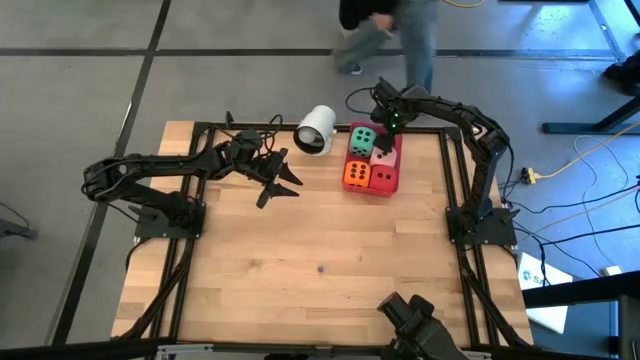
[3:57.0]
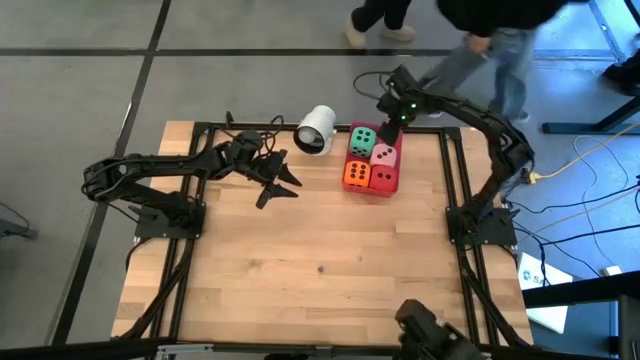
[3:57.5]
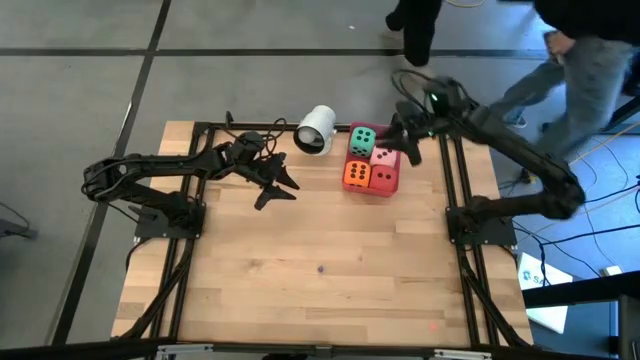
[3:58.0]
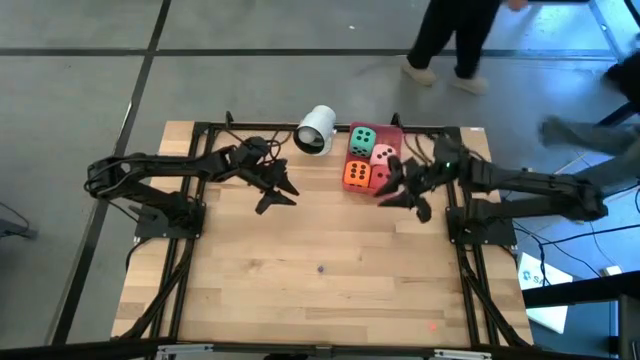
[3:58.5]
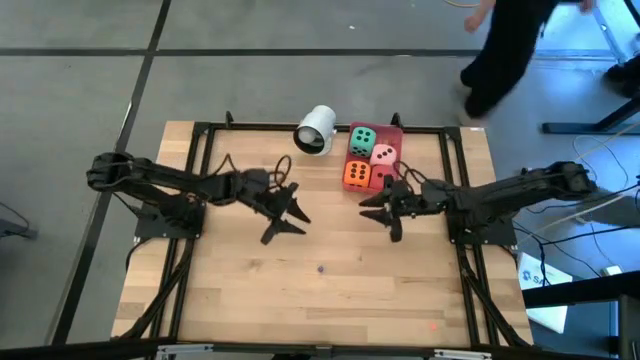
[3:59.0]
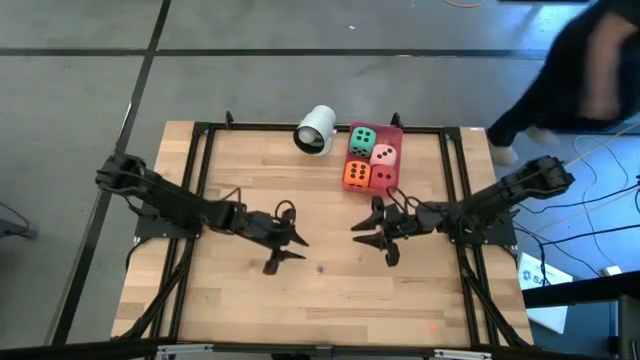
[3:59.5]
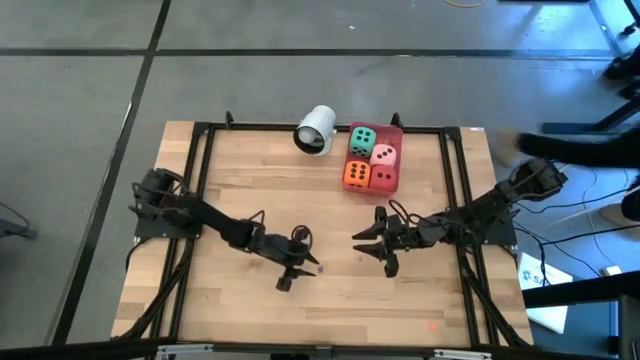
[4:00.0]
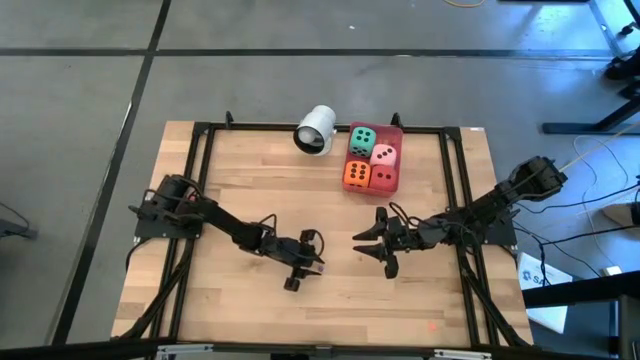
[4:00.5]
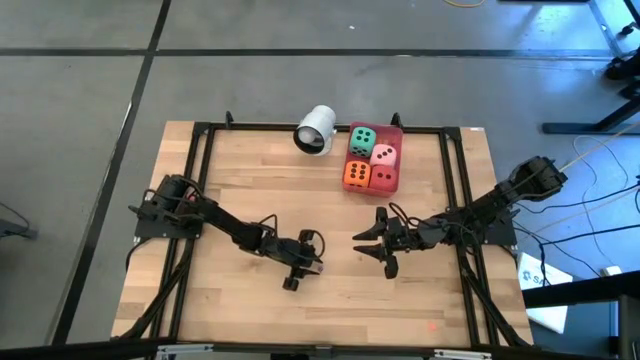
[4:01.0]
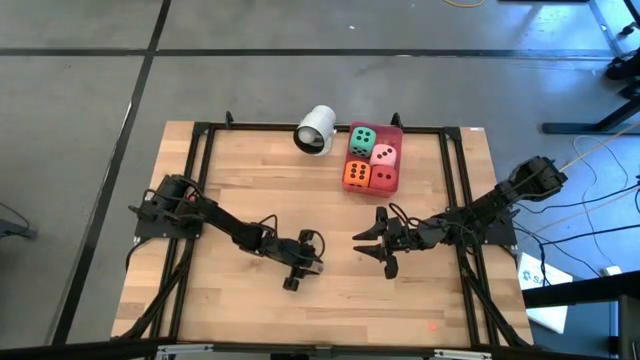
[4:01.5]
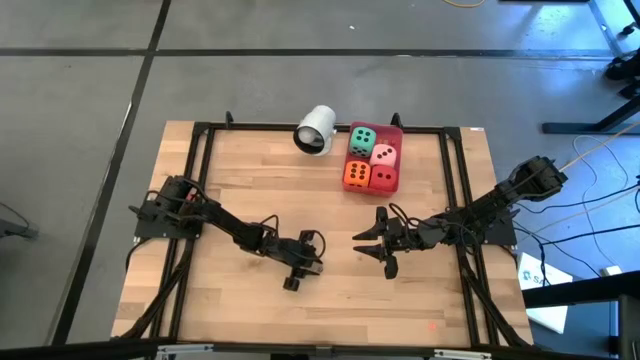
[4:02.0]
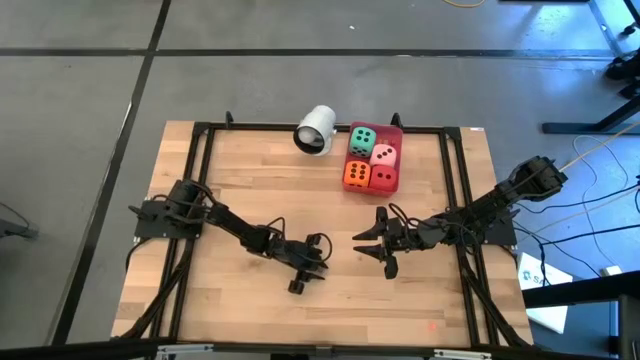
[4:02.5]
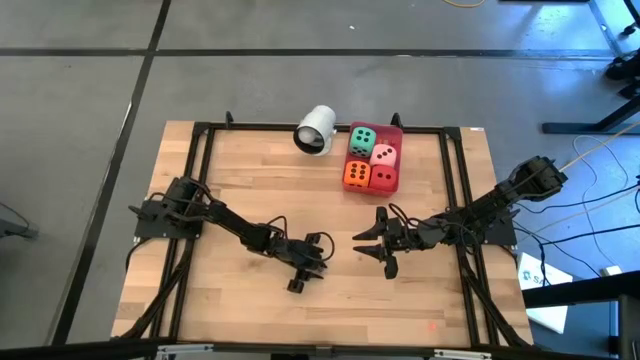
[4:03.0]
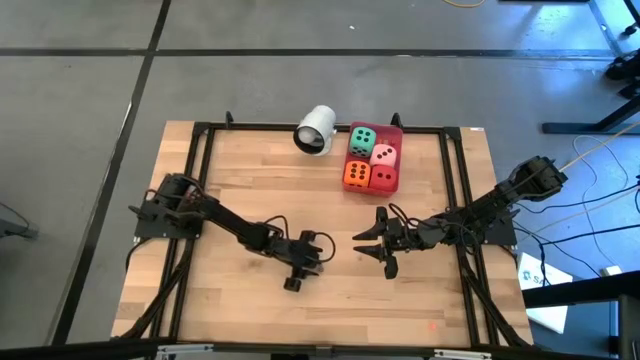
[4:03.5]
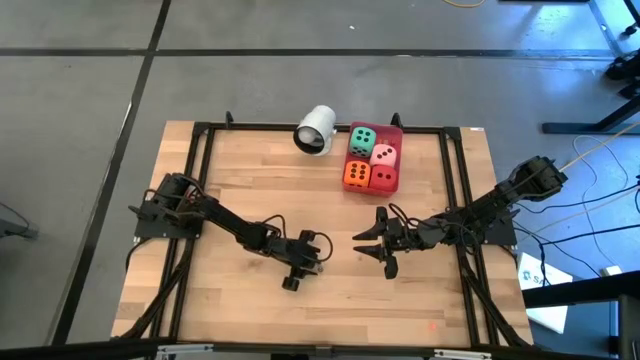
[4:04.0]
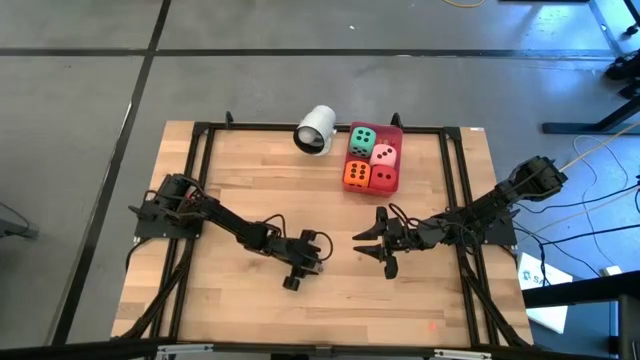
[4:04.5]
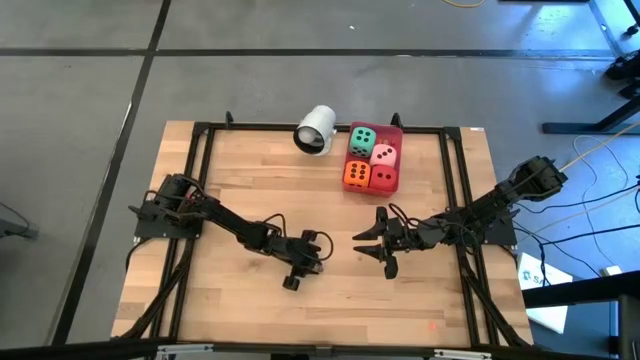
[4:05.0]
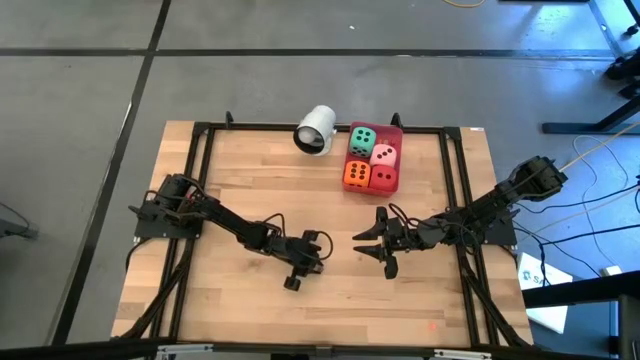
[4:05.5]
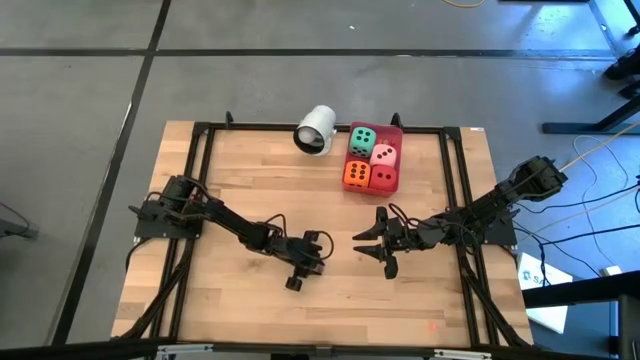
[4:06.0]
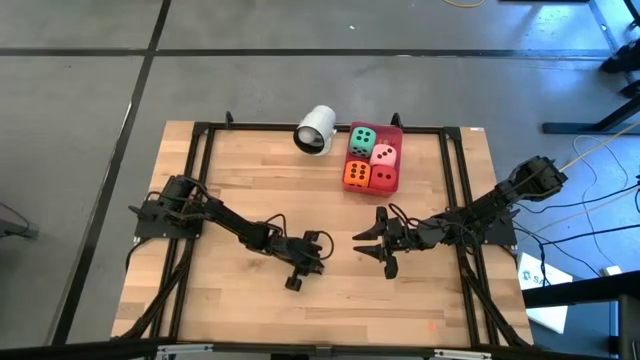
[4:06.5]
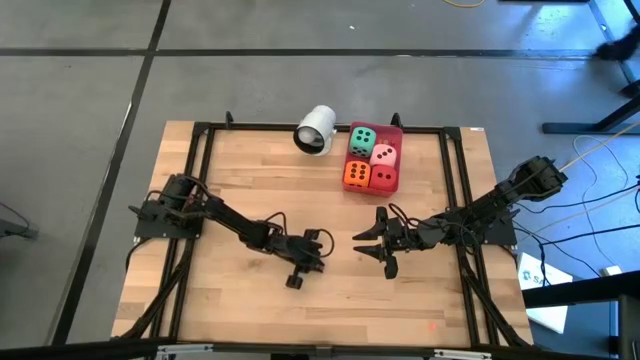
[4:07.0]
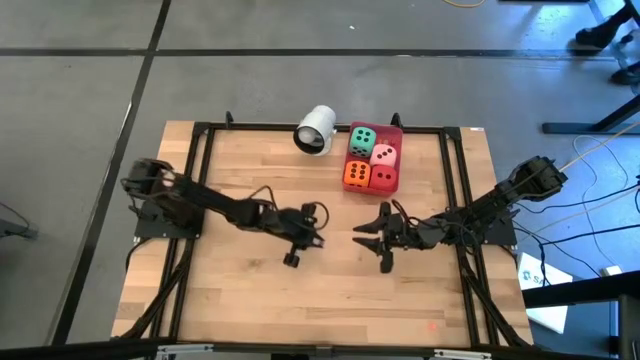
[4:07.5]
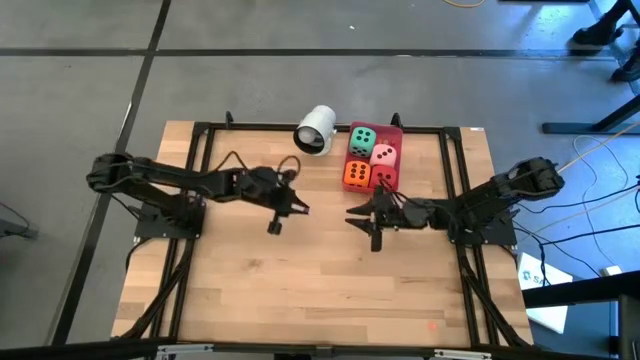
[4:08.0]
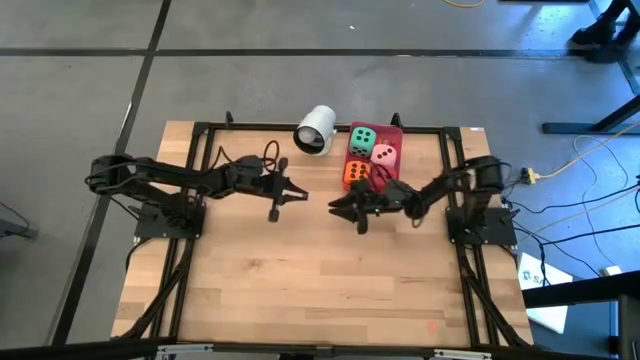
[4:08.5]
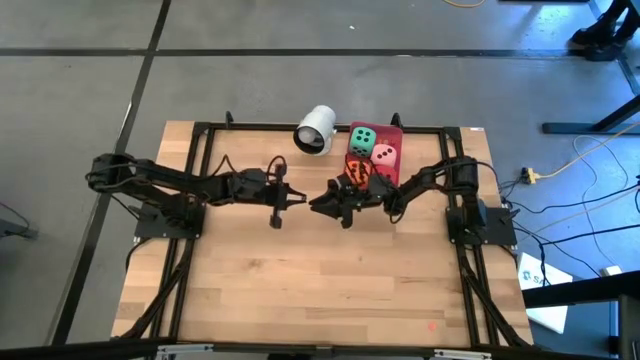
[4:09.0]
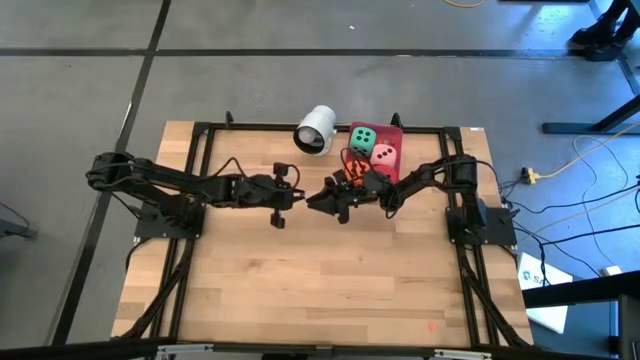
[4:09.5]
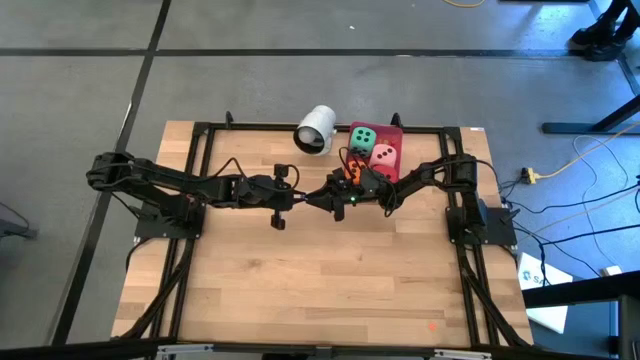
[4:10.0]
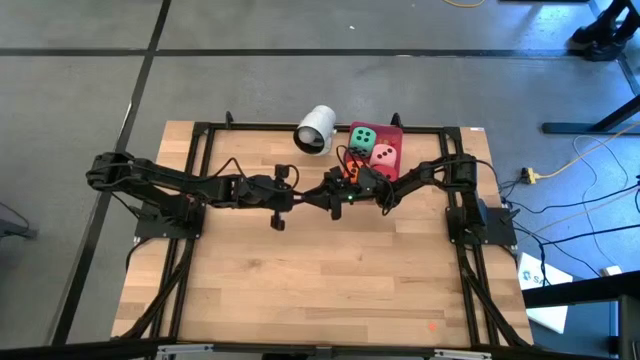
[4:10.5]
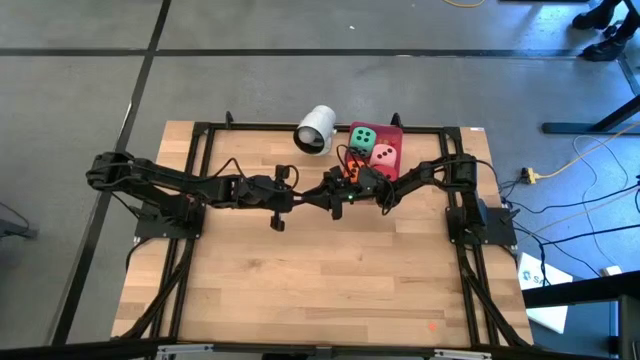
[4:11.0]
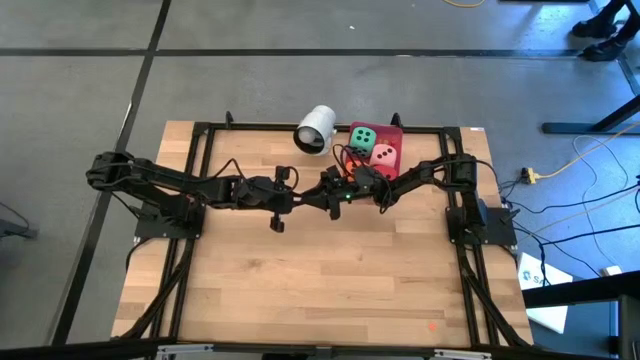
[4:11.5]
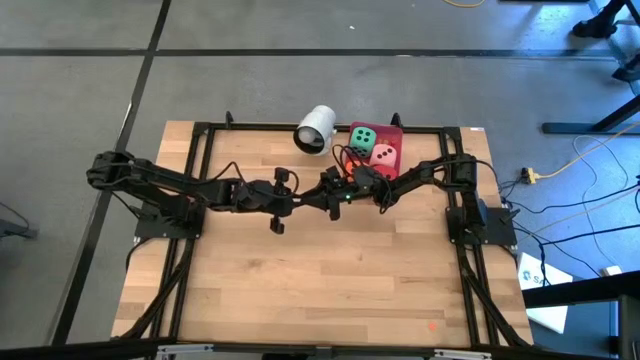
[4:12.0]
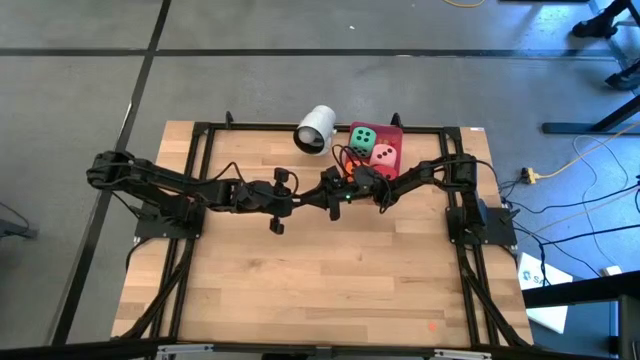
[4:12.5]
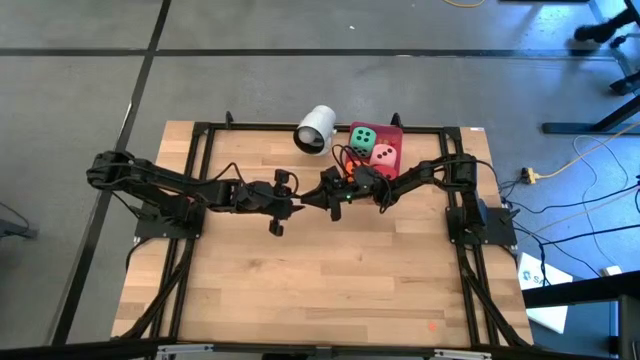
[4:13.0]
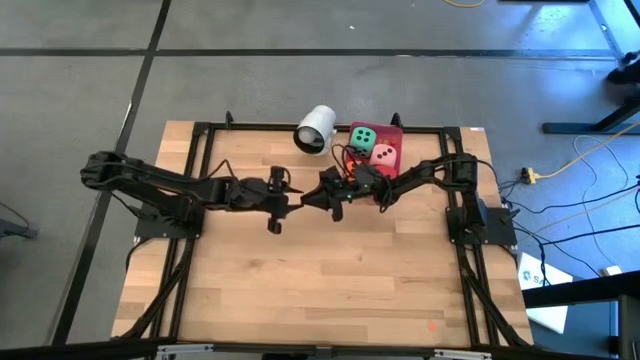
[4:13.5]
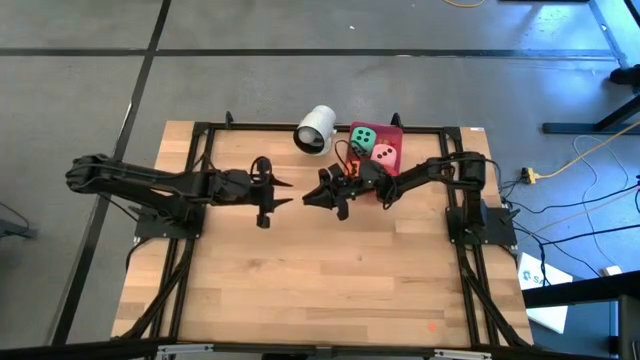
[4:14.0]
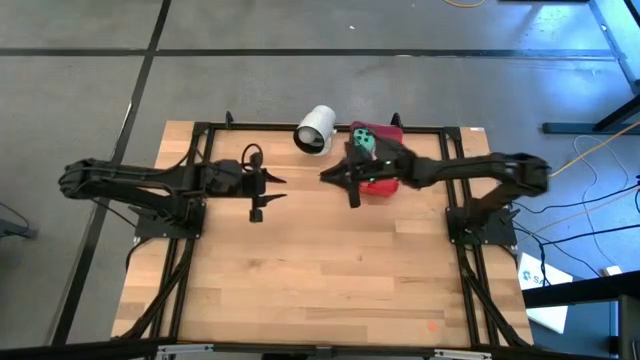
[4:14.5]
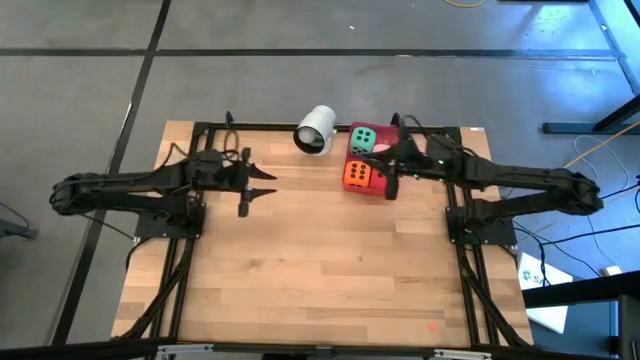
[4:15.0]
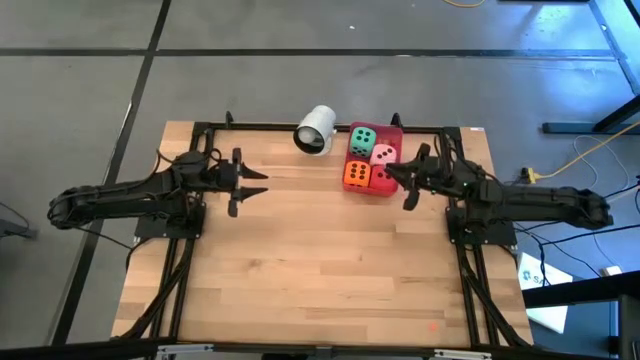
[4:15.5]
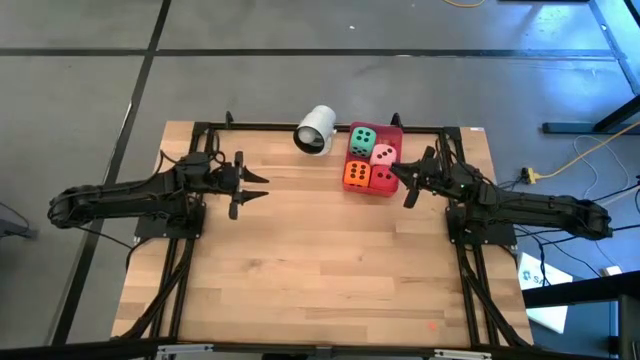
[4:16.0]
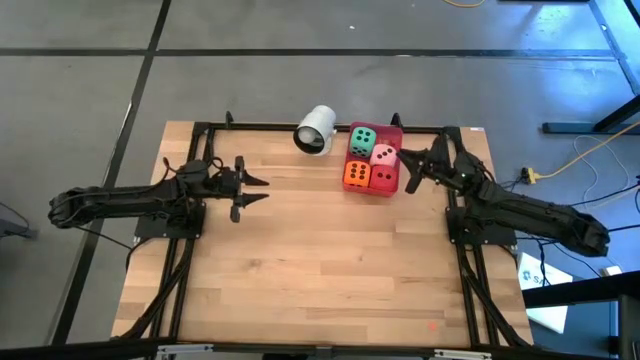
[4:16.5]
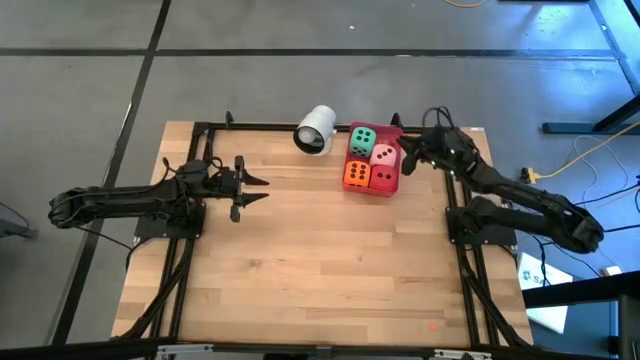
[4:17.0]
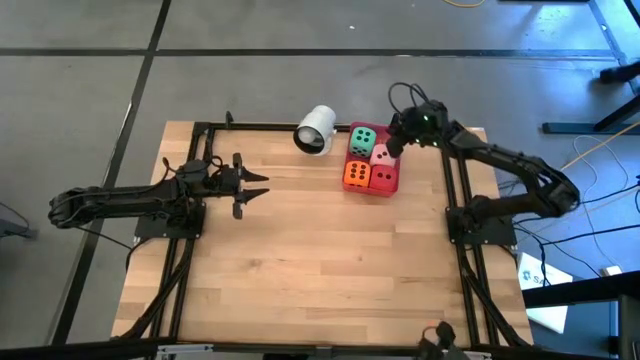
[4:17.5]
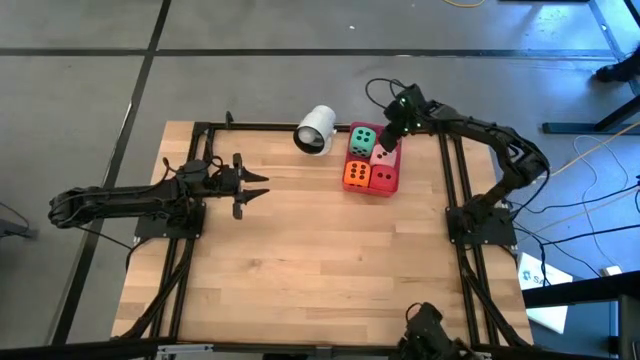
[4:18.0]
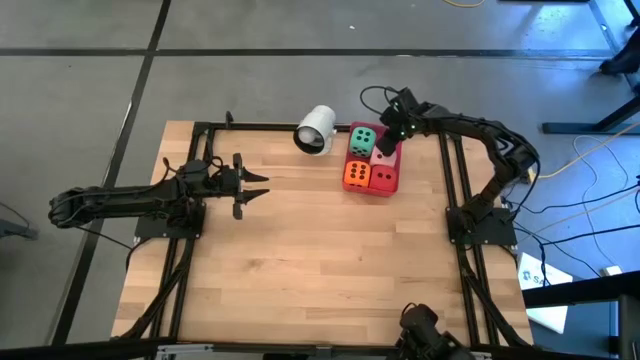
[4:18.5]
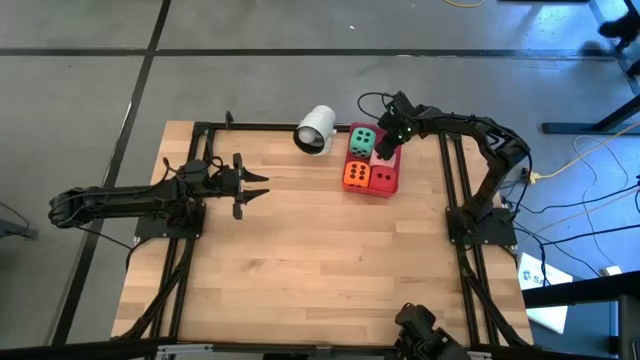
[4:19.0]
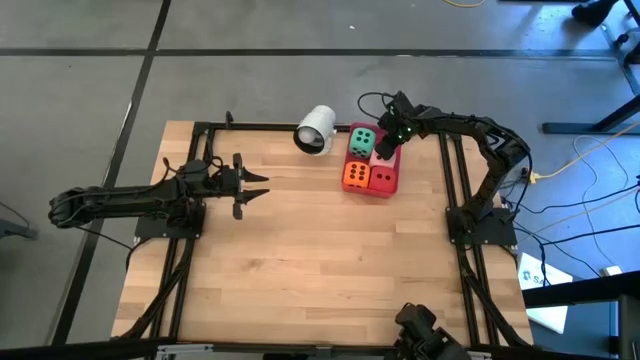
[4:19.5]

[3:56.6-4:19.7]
Task: Pick & Place Dice
Put the small blue dice into the red bin
